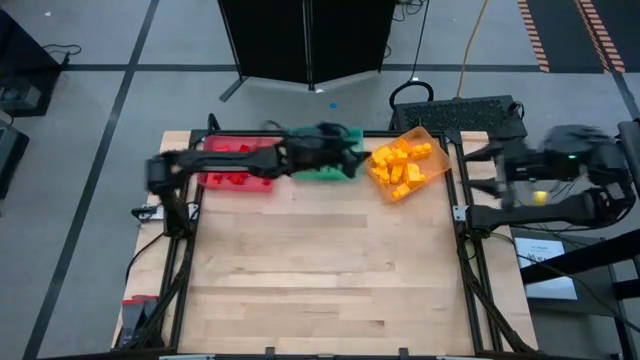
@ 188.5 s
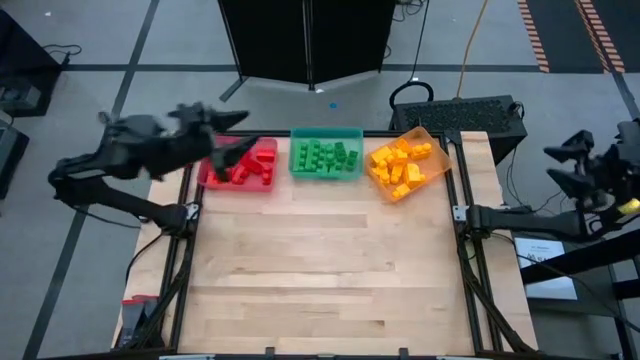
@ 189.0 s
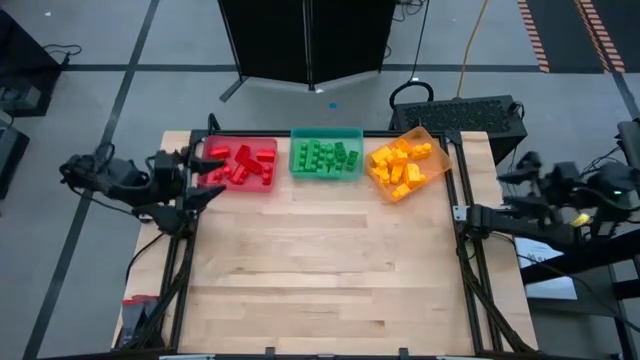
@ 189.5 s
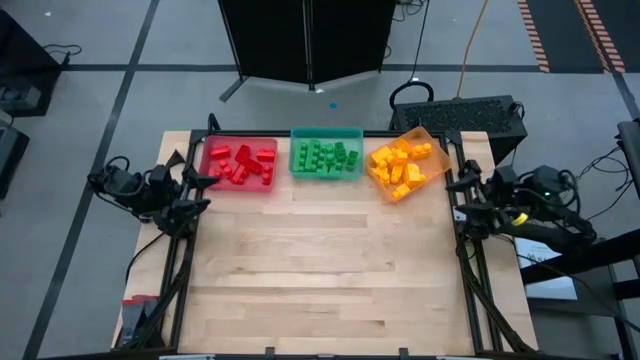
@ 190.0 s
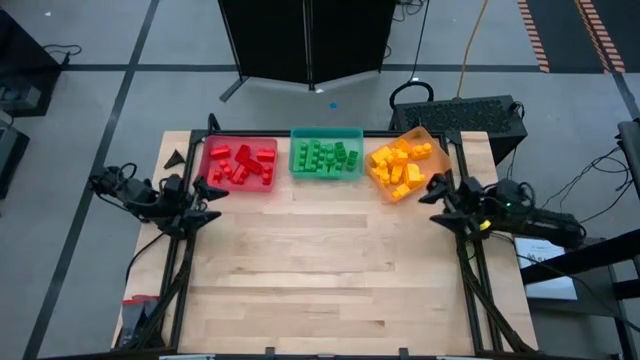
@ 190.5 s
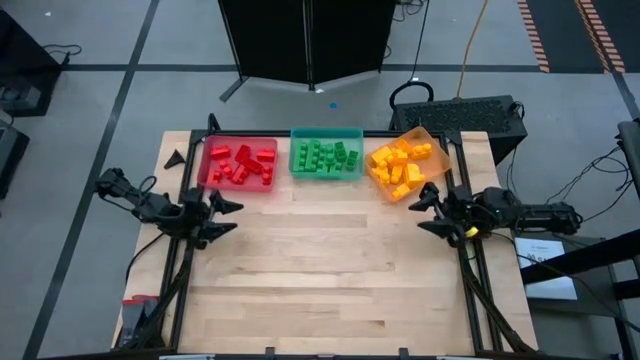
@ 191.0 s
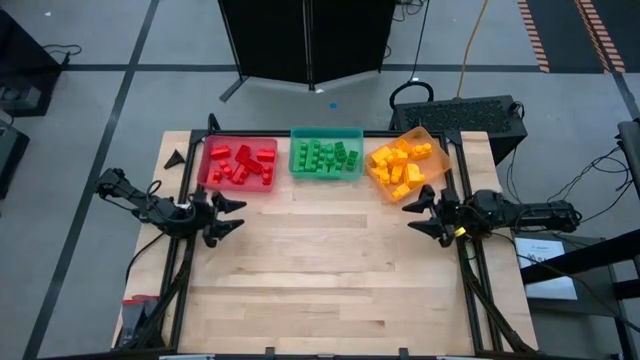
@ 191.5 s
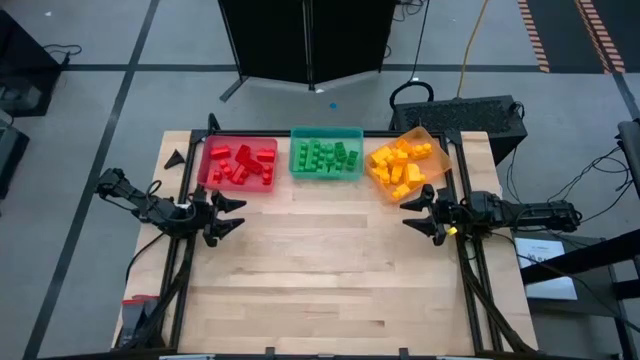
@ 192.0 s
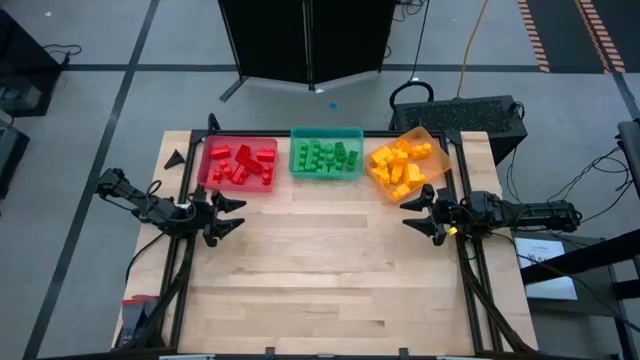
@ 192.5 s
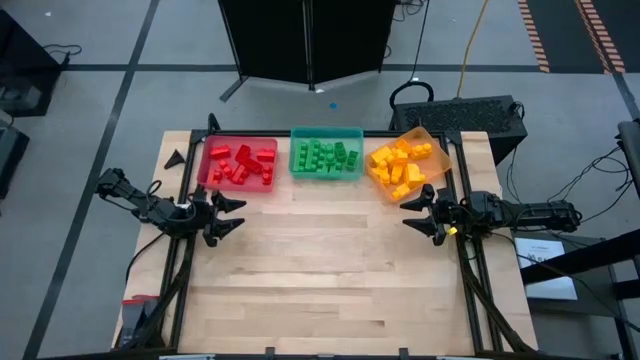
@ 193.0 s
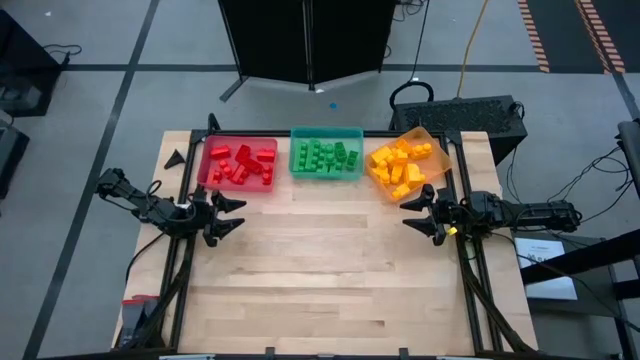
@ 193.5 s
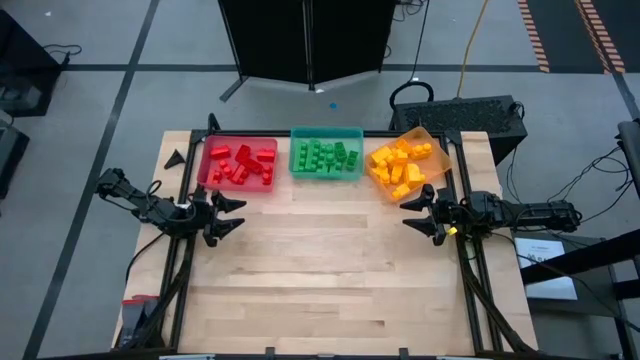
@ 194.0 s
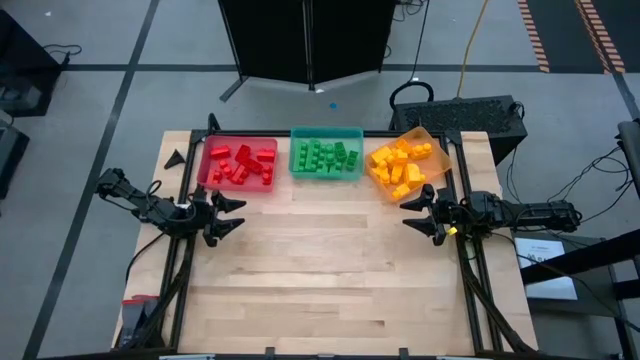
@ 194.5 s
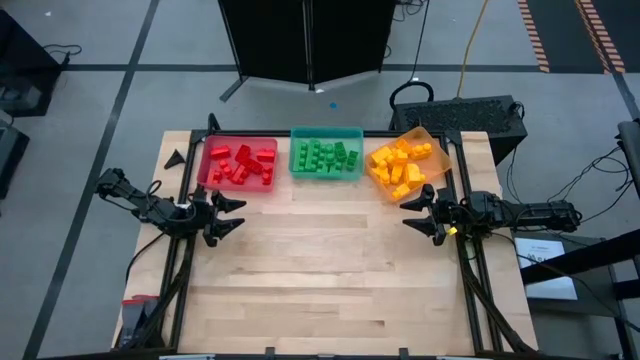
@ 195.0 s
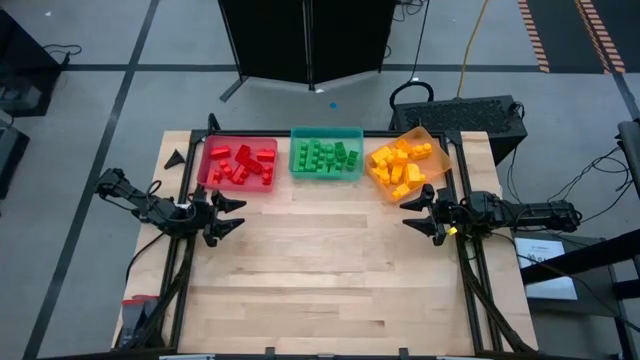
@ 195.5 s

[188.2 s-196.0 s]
Task: Sort blocks
Return to Home Position

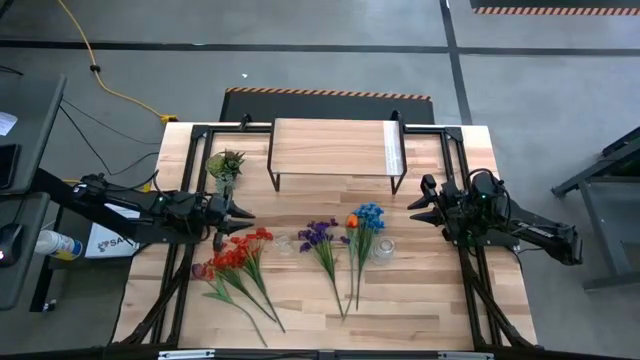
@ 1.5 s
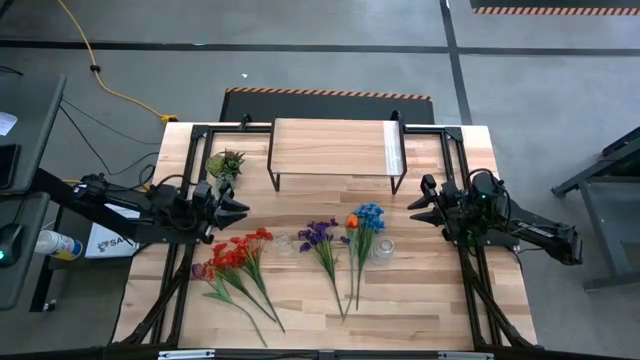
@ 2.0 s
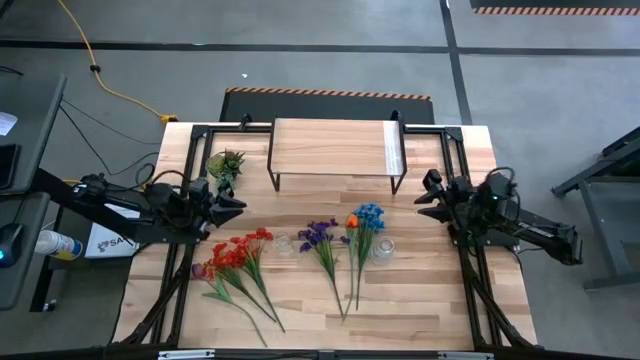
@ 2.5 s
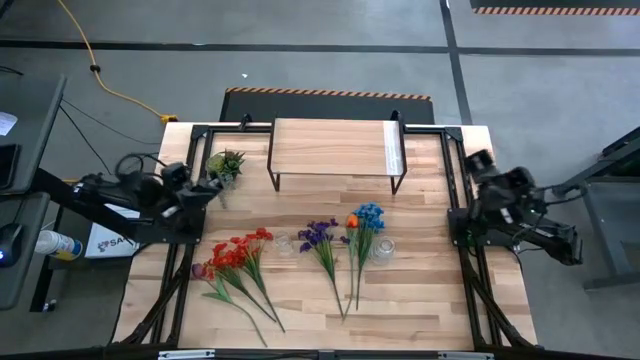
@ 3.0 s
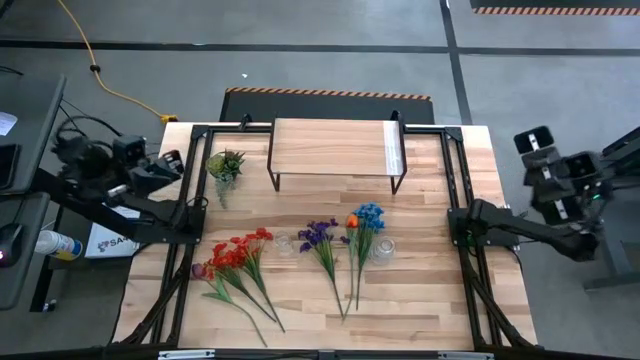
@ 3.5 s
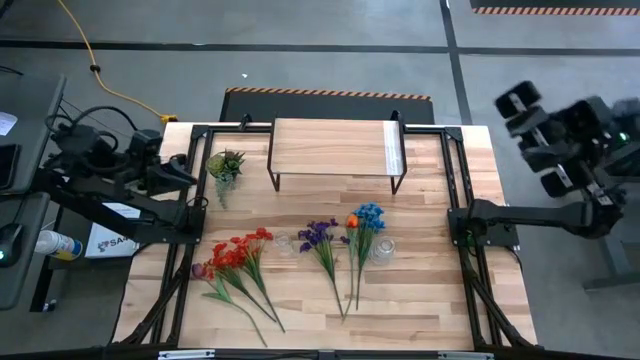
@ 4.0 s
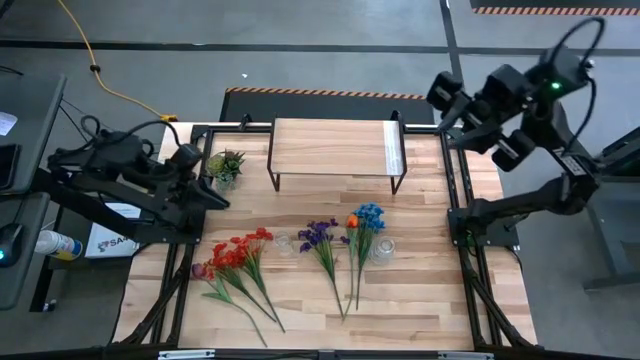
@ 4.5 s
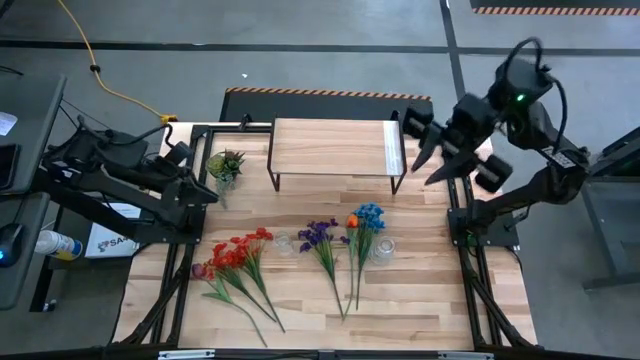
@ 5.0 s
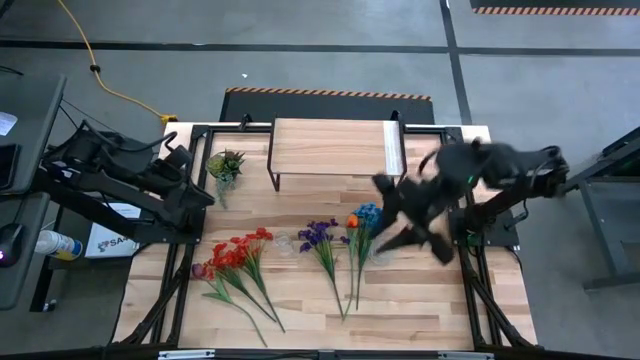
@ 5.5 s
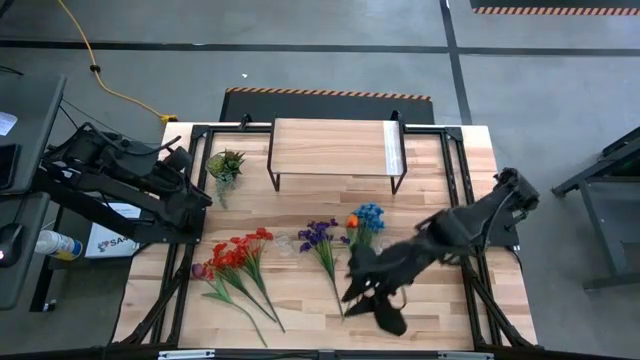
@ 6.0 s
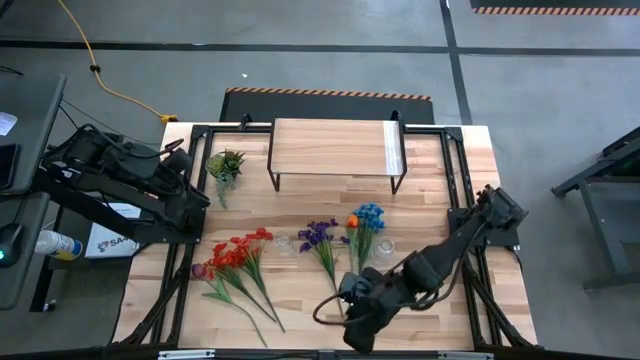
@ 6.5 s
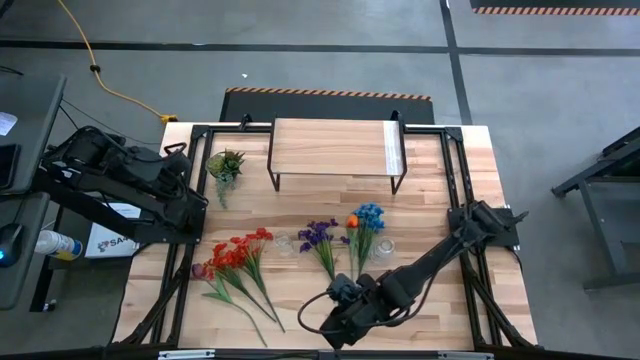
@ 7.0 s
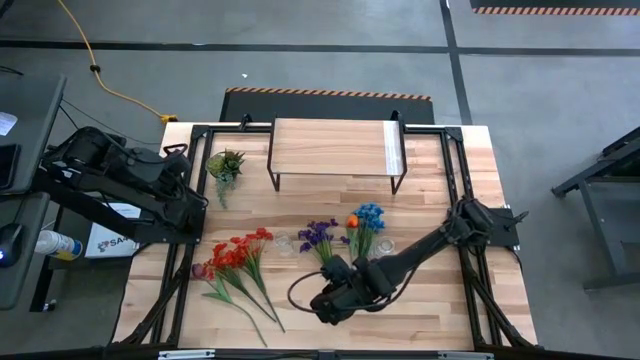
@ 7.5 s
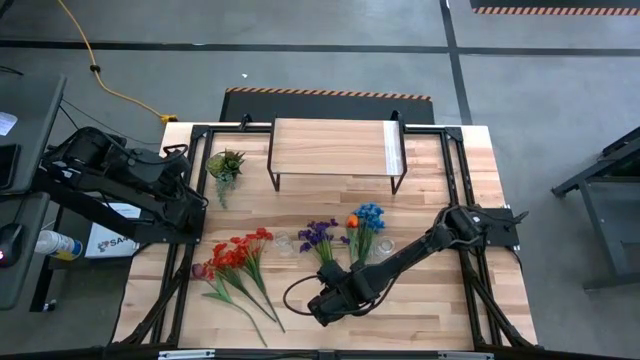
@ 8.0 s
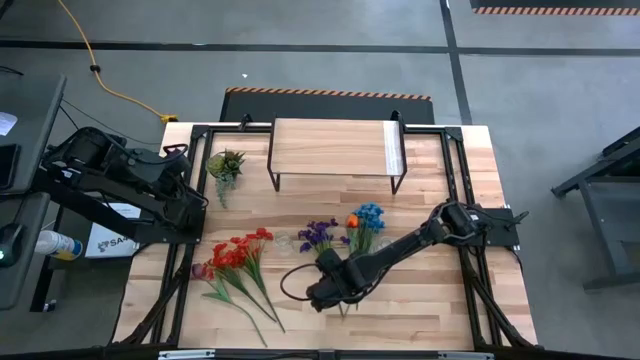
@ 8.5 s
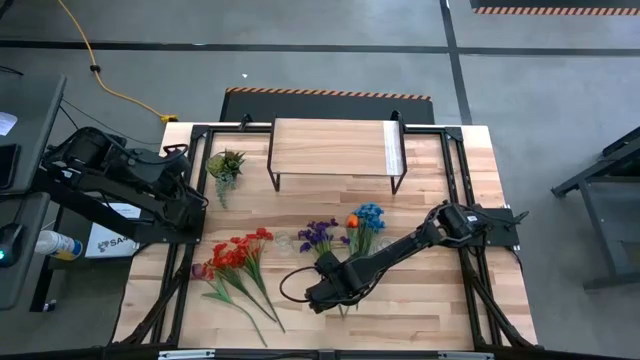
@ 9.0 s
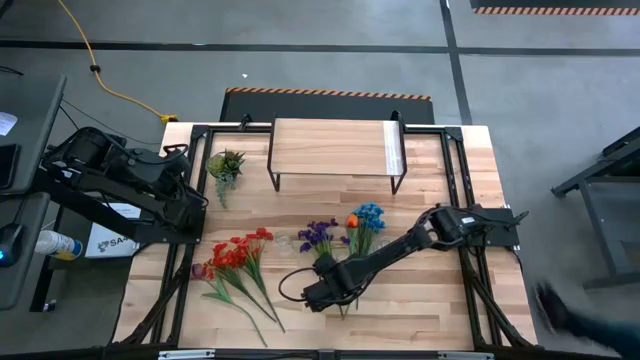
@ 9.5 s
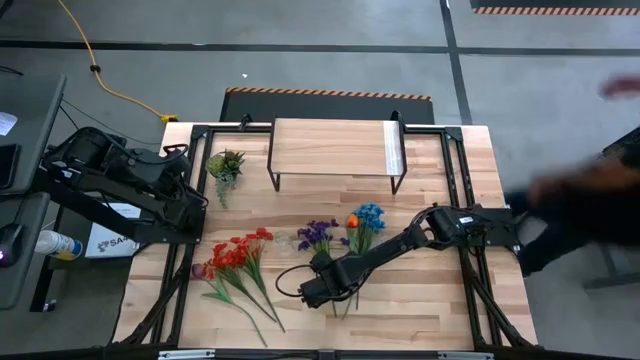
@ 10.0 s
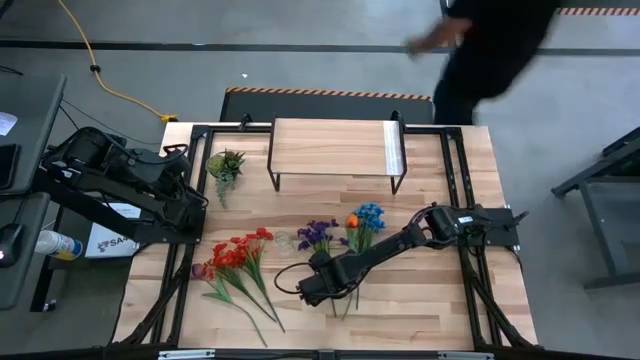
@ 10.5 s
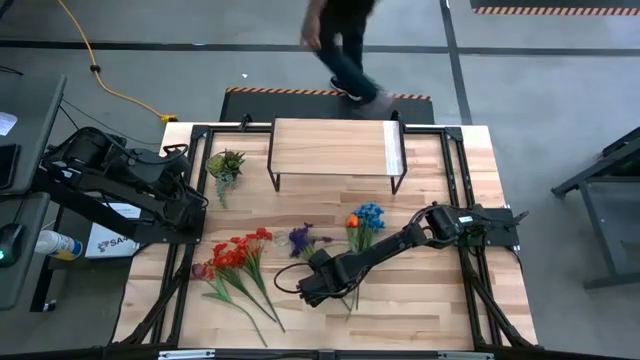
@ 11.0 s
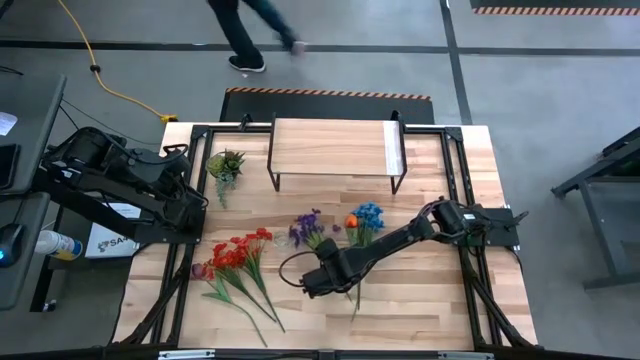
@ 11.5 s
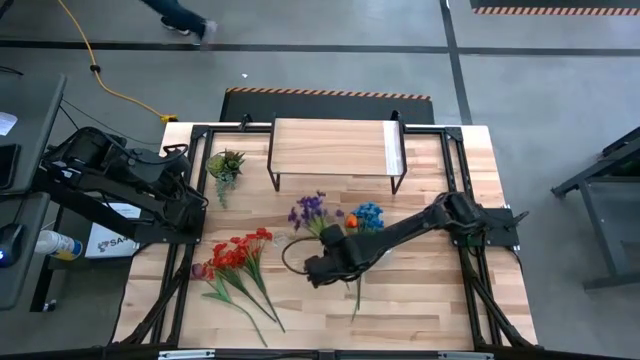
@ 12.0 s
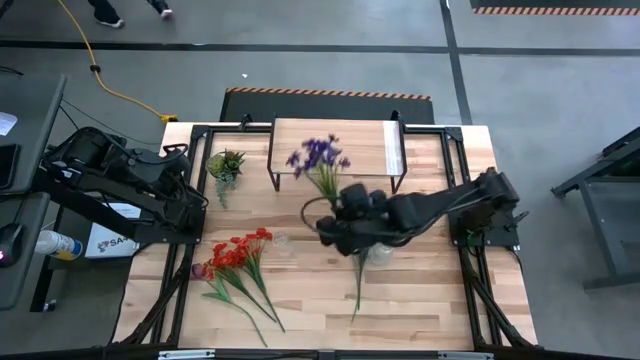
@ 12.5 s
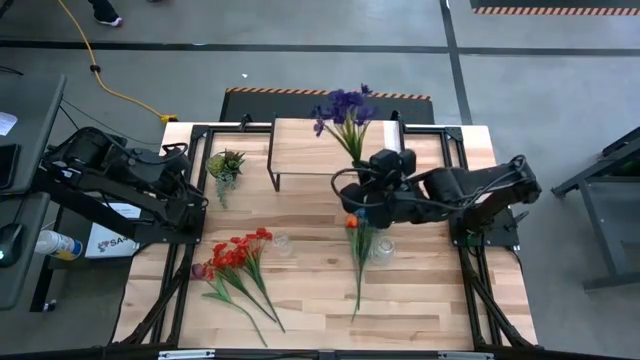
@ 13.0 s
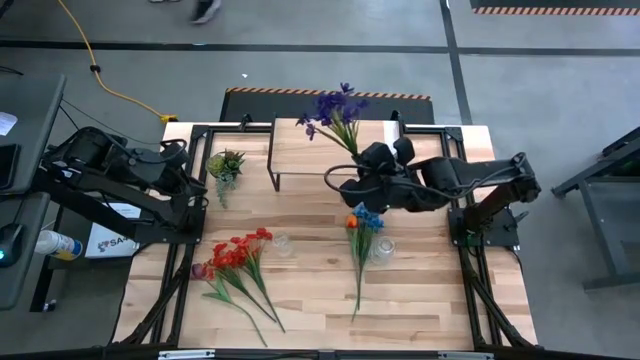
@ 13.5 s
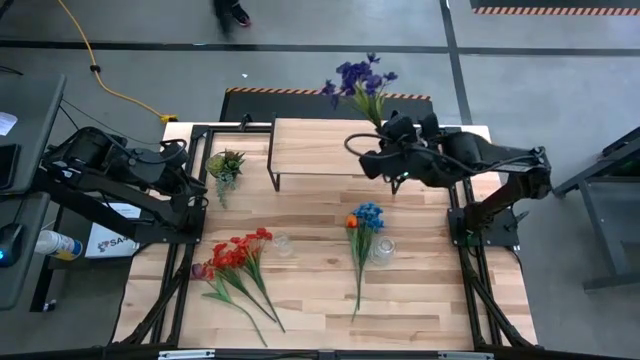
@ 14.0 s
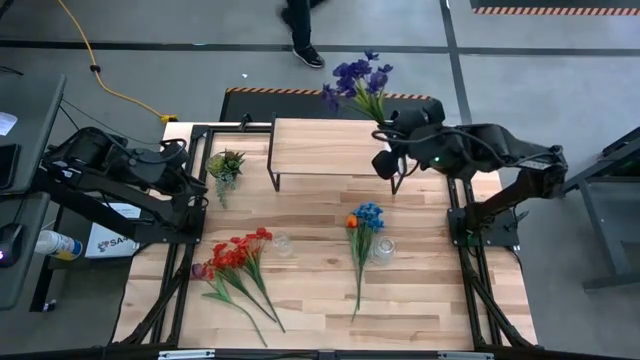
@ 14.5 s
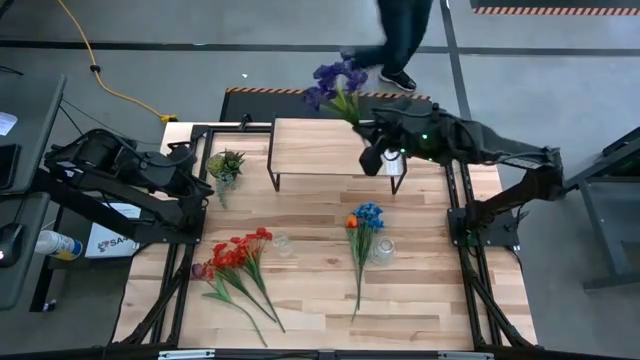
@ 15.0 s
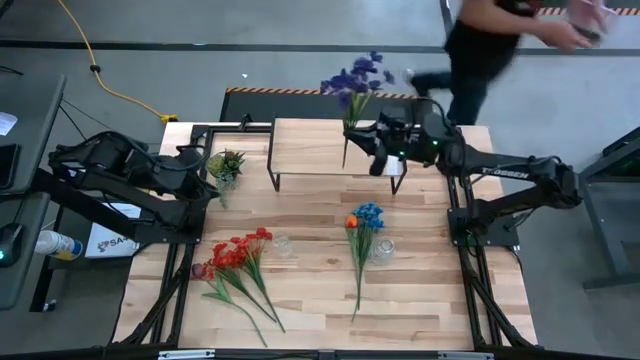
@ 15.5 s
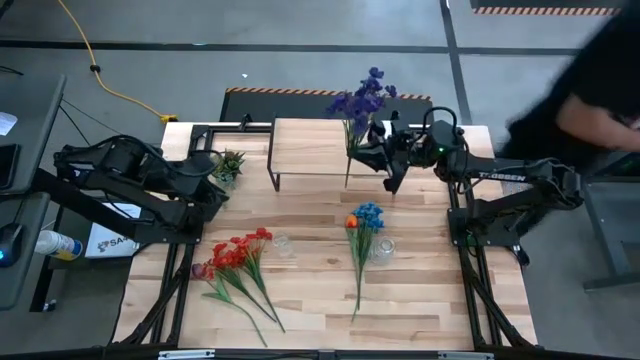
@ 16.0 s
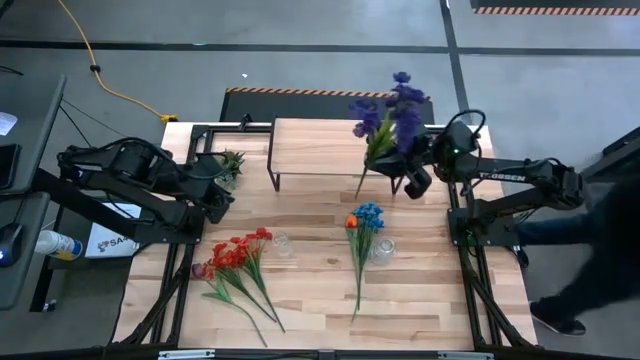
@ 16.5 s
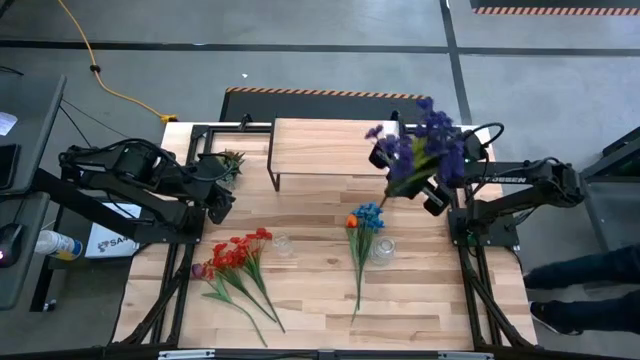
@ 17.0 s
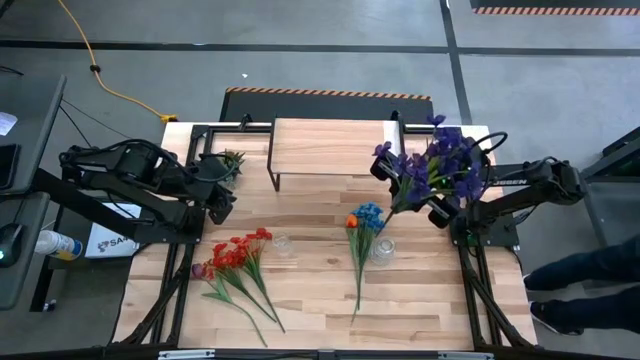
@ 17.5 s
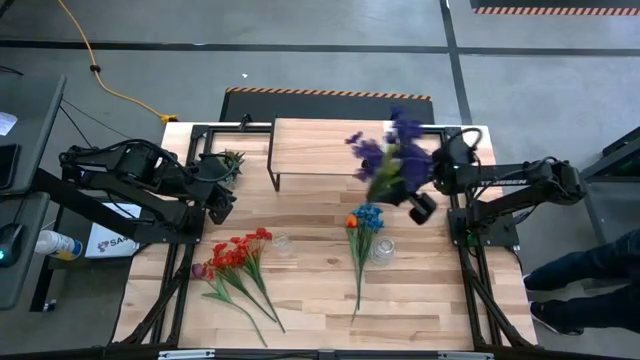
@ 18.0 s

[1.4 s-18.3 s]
Task: Pick and place flowers into a vace then onto a shelf
Put the purple flower into the left transparent flower vase
